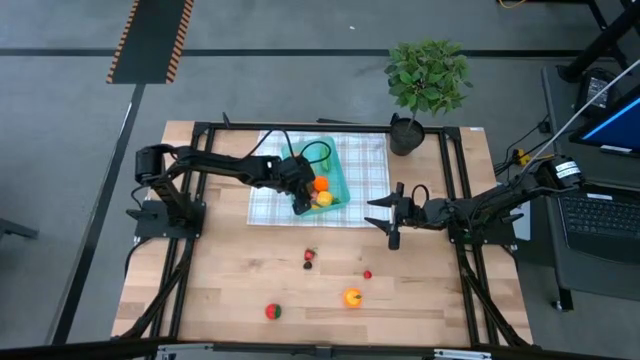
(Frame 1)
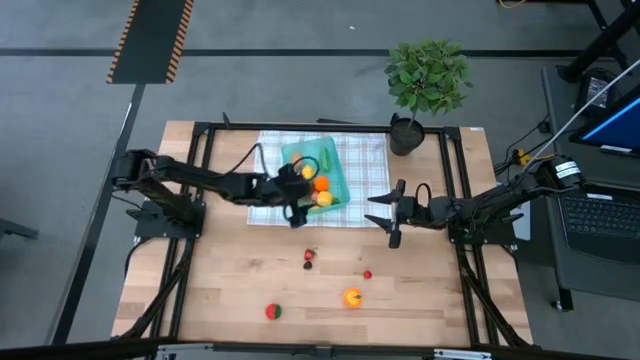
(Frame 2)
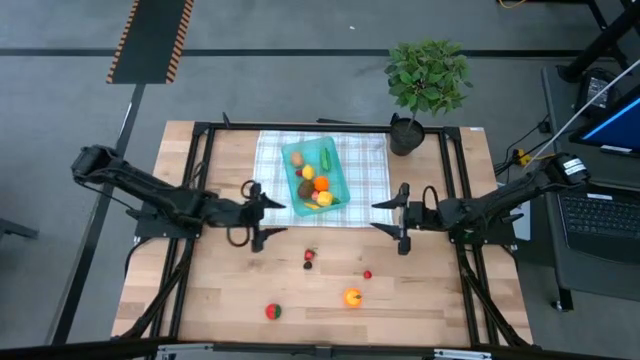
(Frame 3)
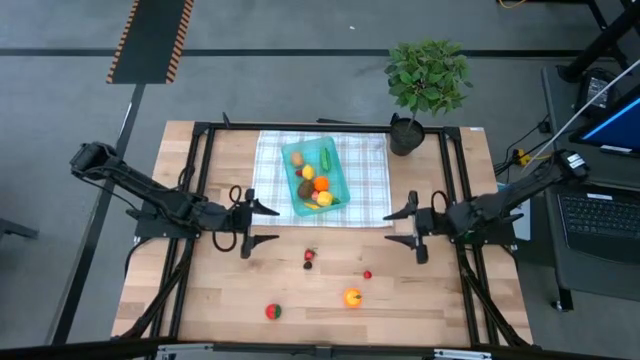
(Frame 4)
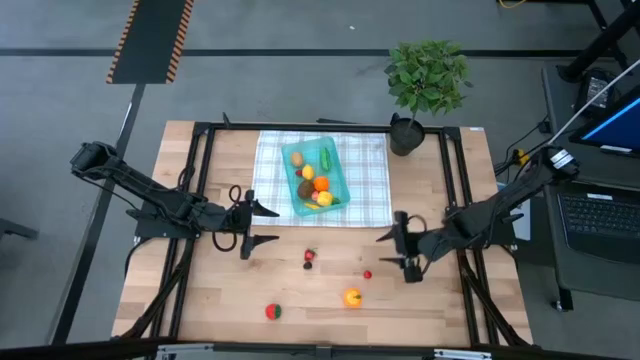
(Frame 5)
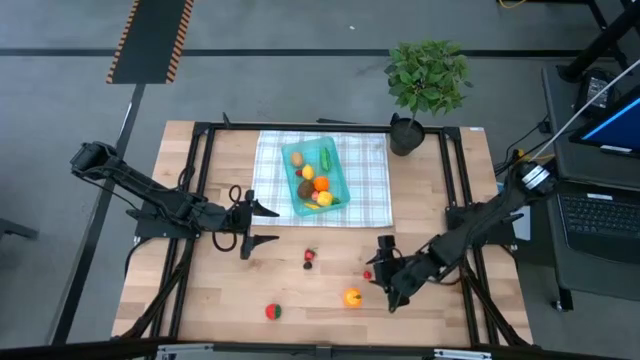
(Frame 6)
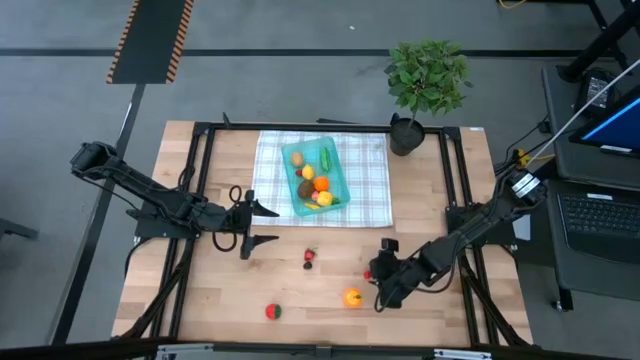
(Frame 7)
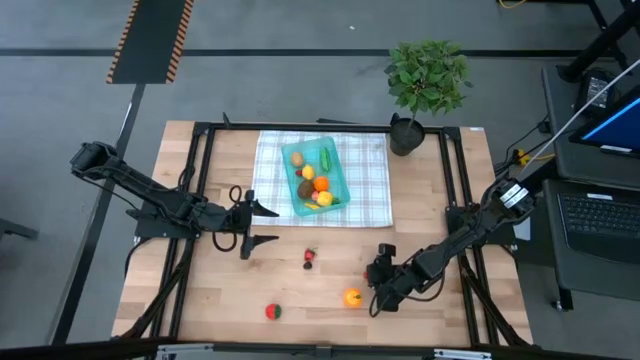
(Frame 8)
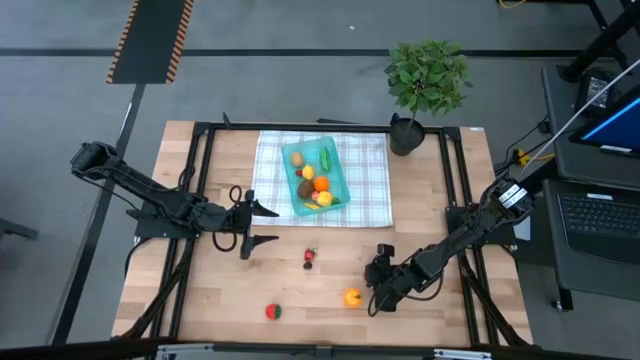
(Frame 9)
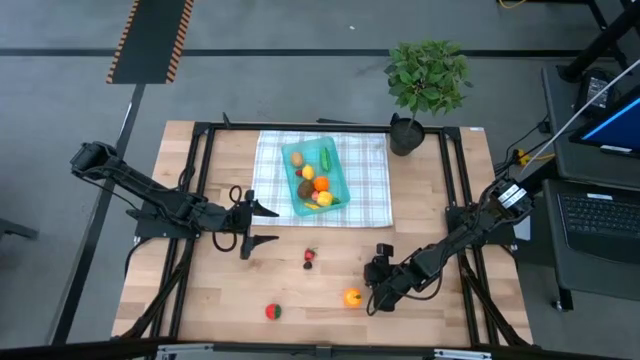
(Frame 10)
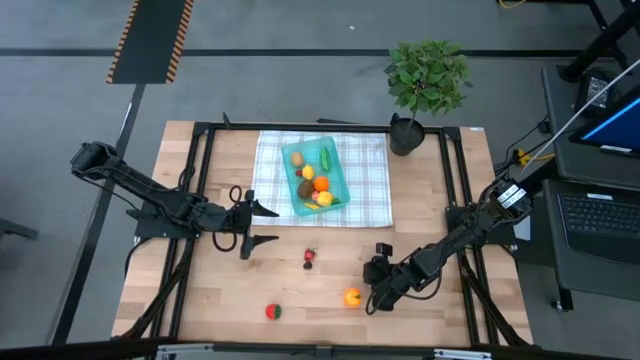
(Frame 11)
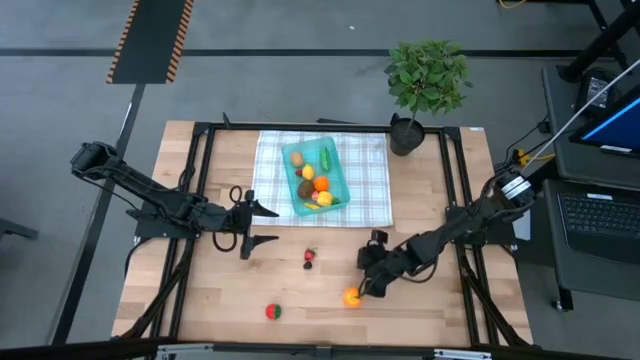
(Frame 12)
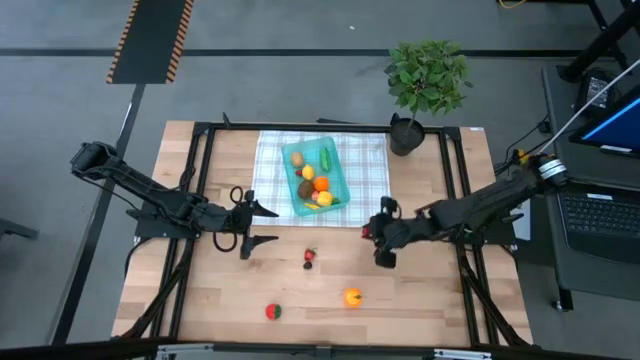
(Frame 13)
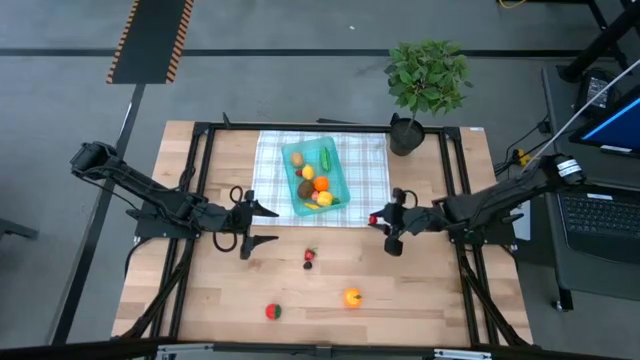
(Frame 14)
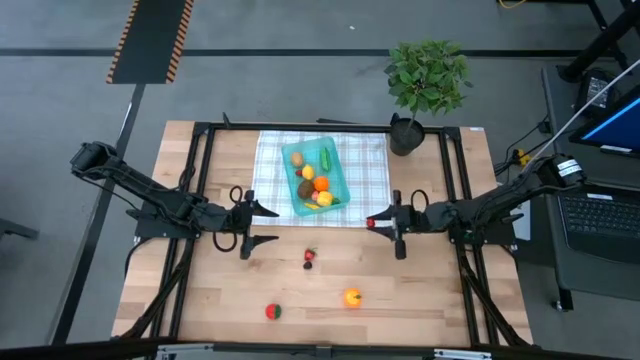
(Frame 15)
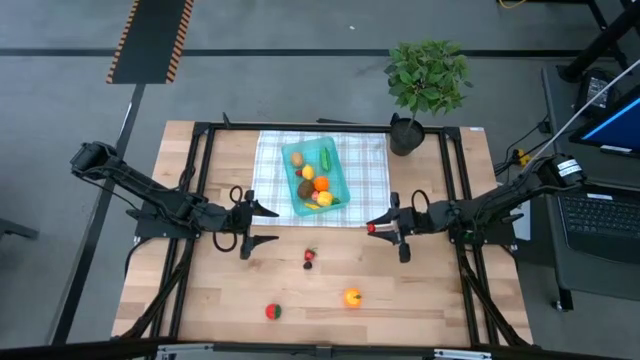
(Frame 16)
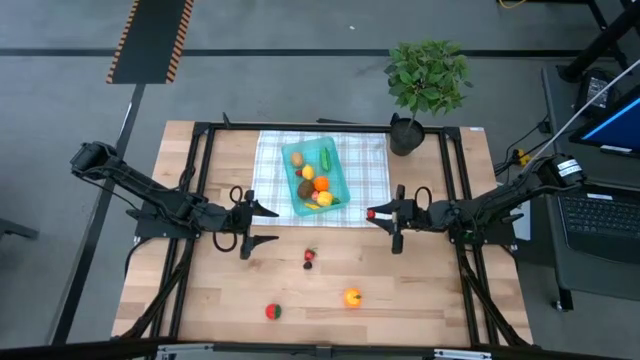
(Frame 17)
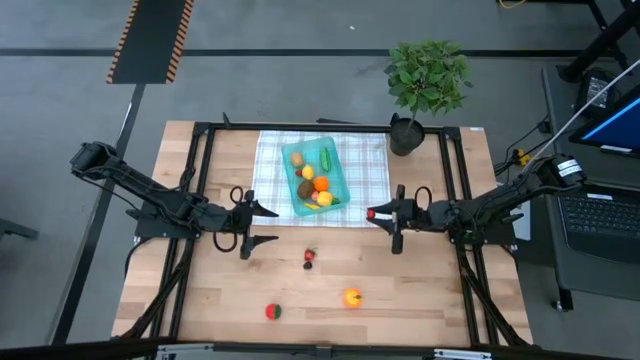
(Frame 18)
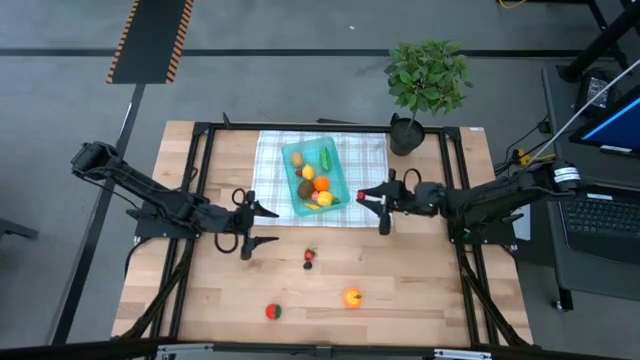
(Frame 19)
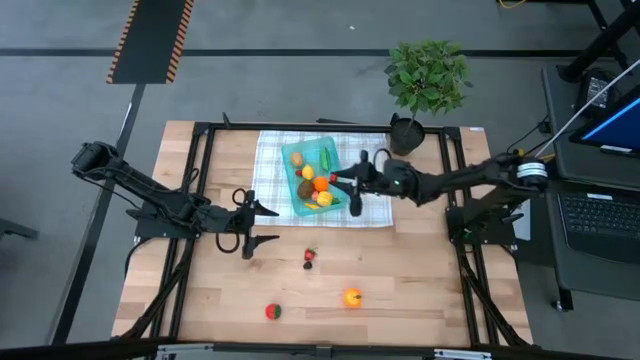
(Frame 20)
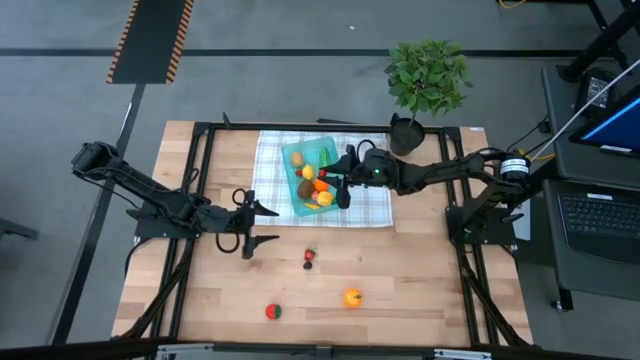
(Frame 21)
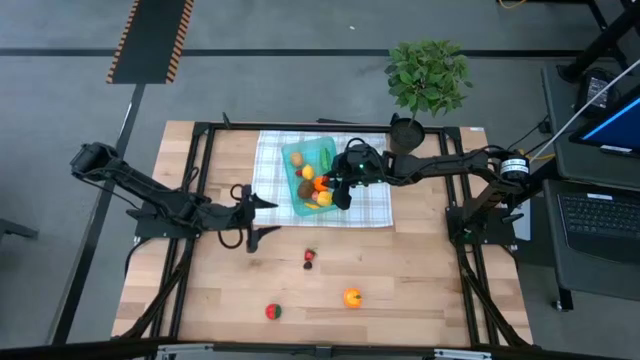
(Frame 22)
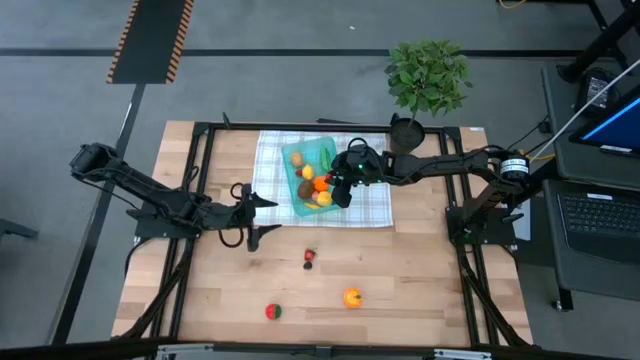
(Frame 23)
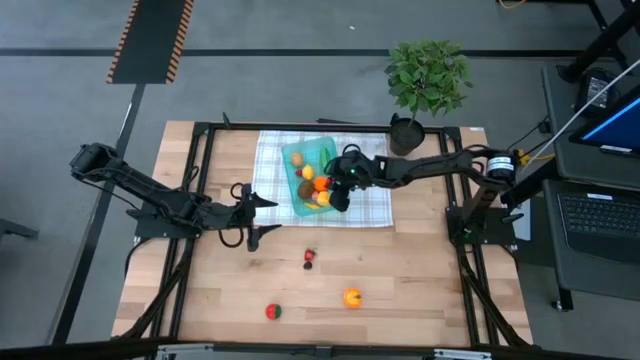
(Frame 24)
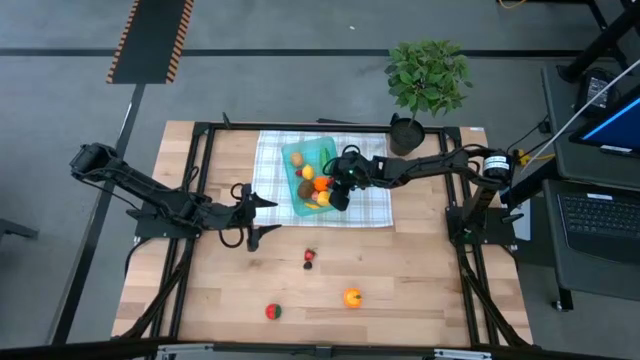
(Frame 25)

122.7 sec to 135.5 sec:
Task: Pick and placing Produce into tupperware
Put the red cherry into the blue bin

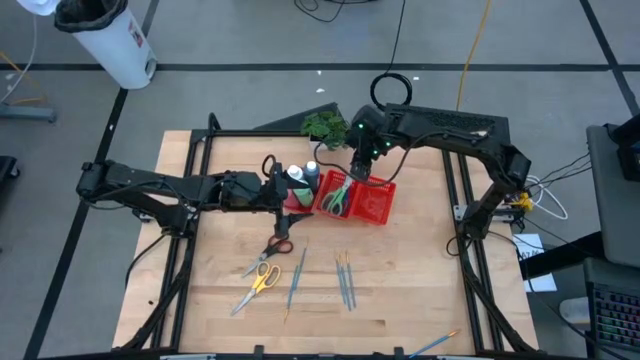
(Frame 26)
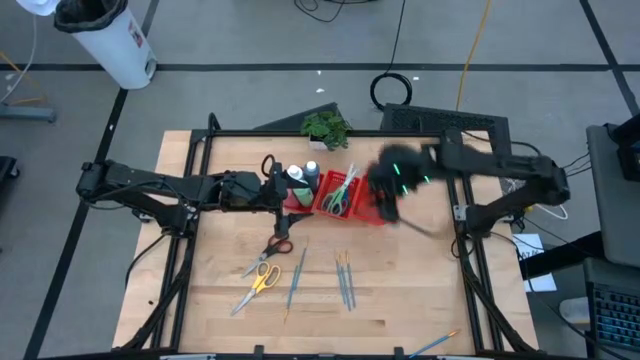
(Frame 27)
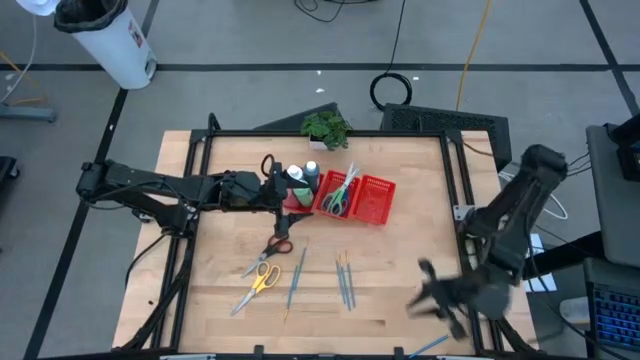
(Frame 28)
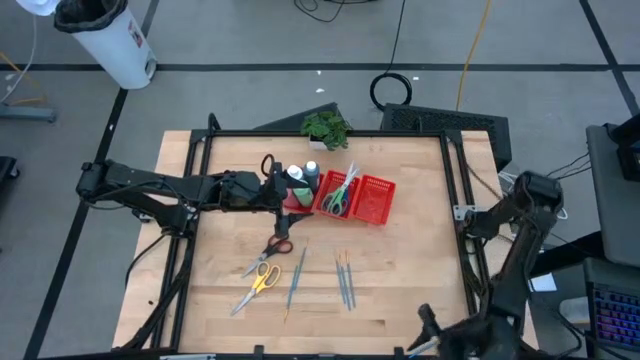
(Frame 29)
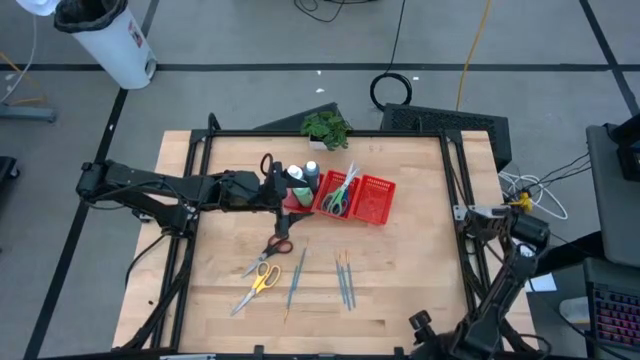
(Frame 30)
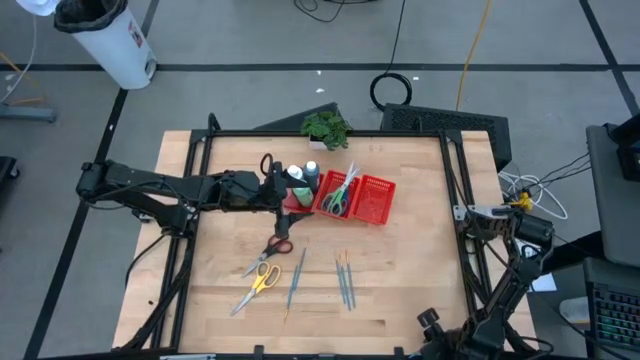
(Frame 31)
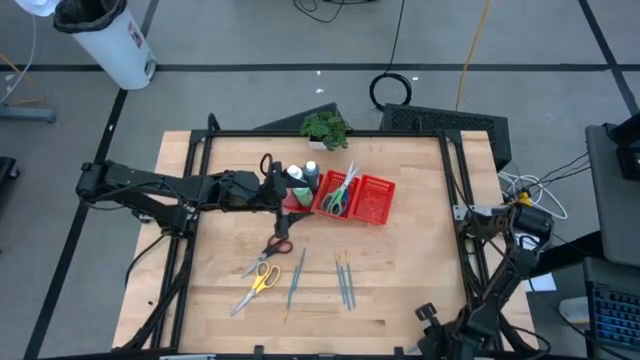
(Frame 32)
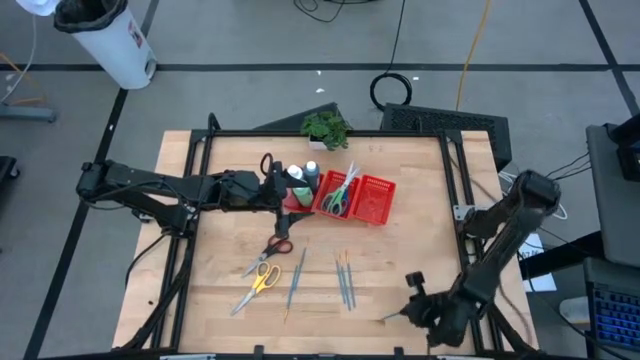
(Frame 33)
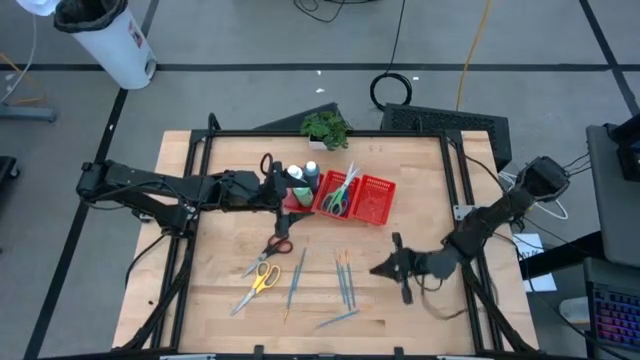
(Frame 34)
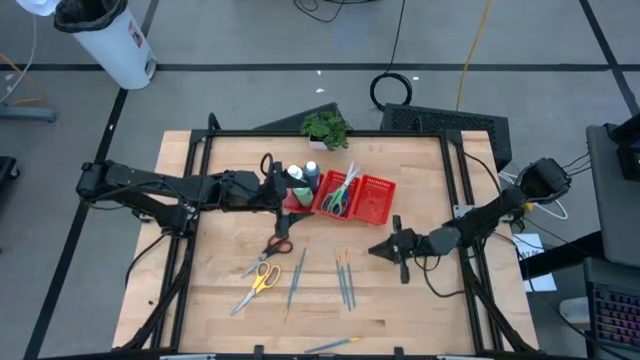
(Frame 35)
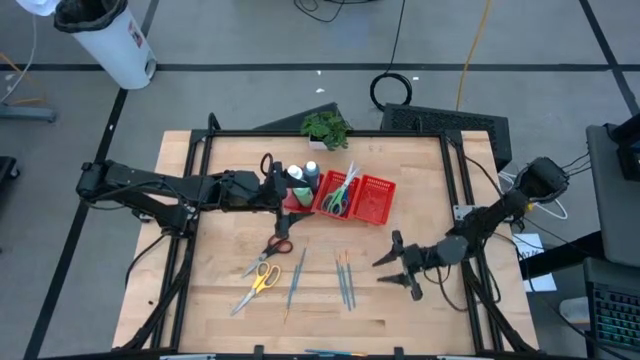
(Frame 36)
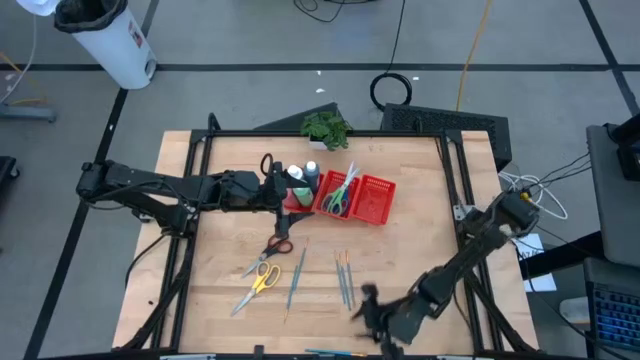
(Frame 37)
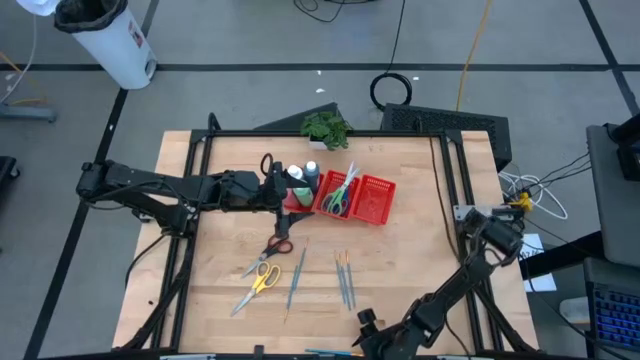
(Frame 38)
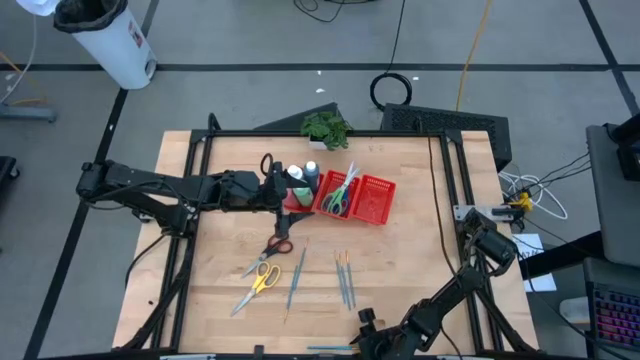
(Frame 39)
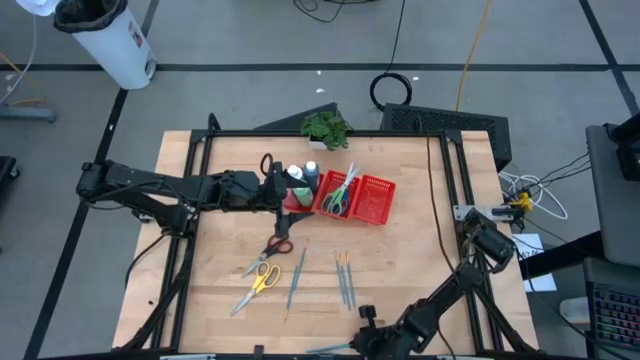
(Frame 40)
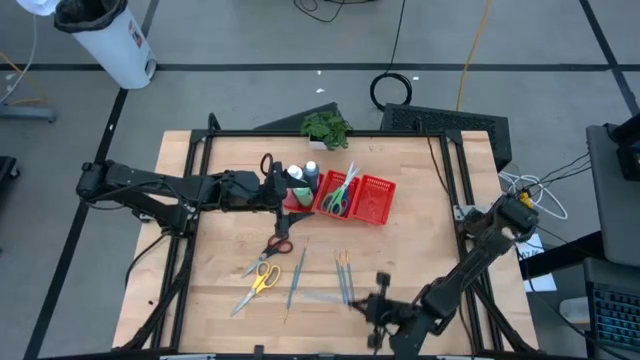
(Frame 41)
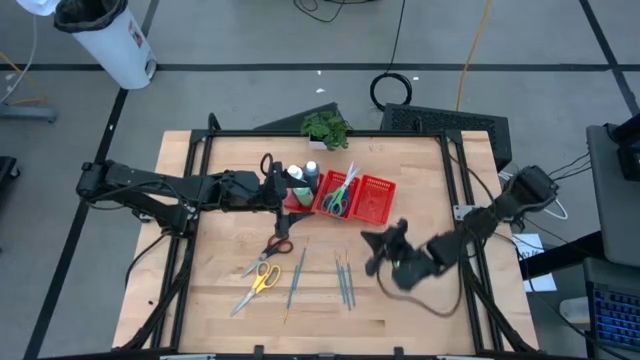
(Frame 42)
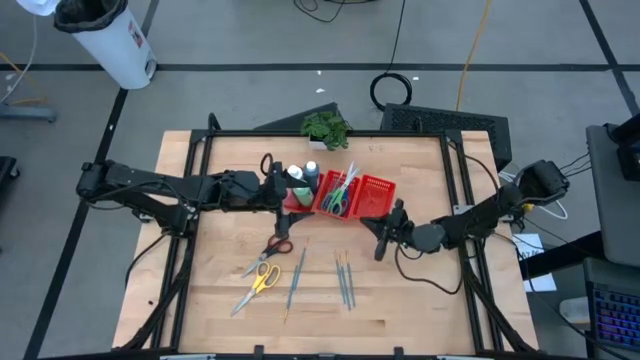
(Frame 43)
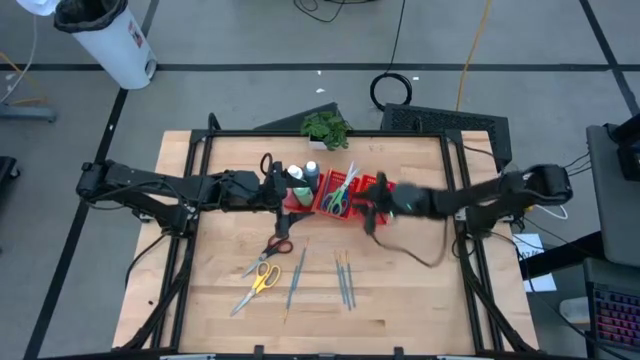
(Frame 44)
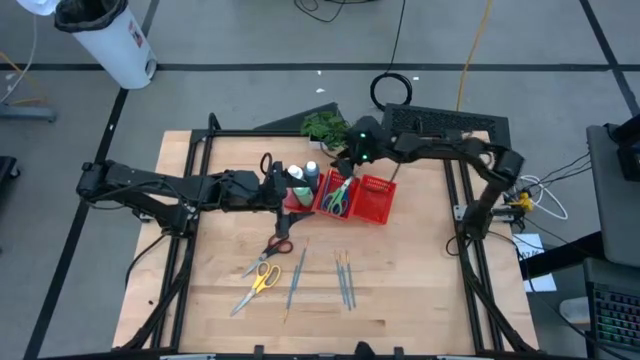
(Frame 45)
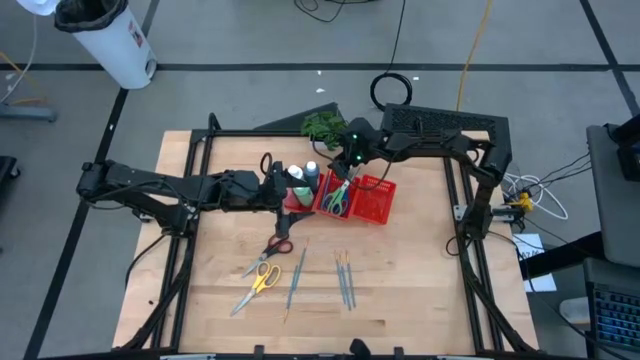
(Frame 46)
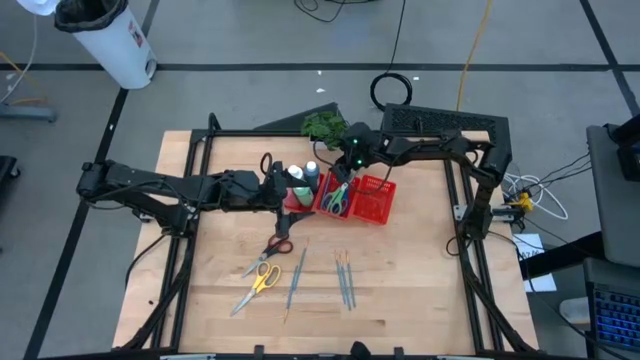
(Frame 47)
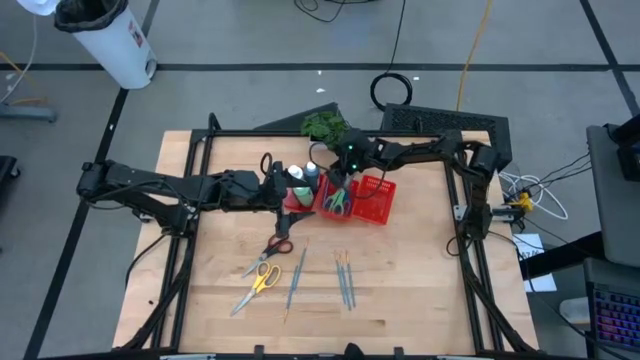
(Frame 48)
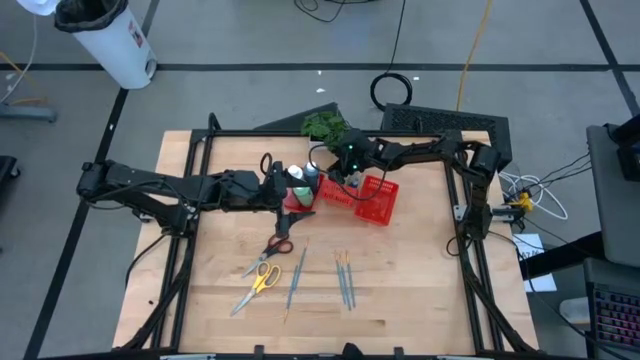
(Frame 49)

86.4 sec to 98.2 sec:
Task: Pick & Place Paint Supplies
Put the blue paint brush into the right red bin
